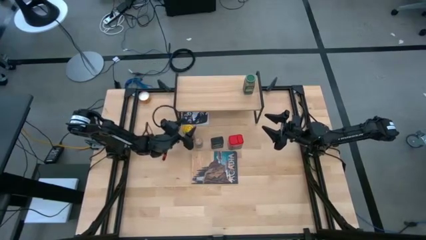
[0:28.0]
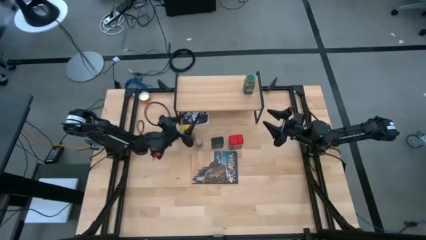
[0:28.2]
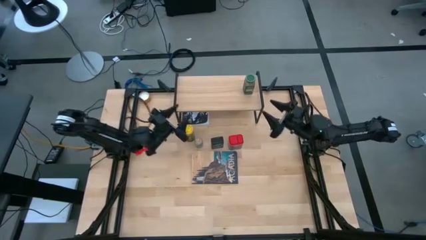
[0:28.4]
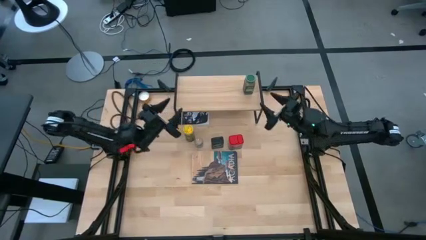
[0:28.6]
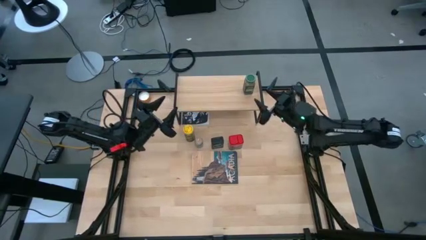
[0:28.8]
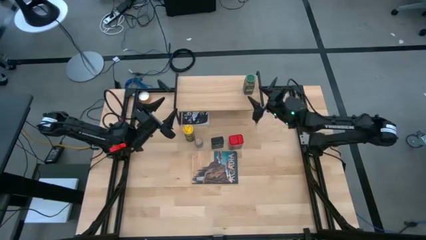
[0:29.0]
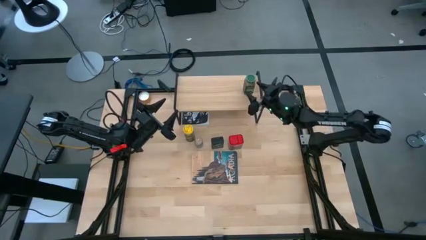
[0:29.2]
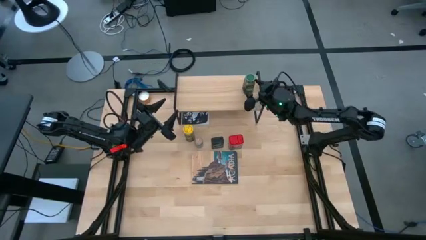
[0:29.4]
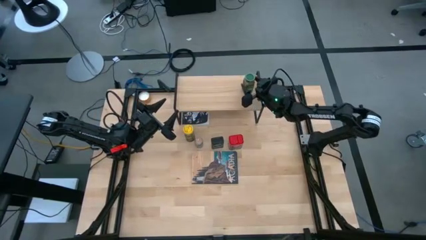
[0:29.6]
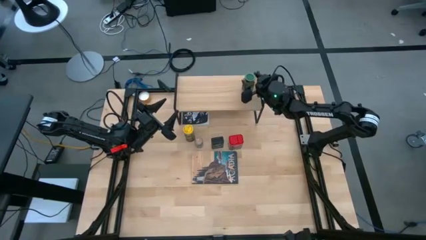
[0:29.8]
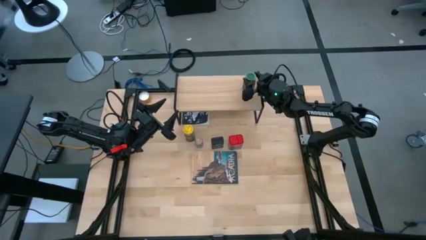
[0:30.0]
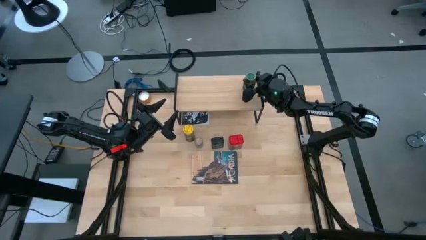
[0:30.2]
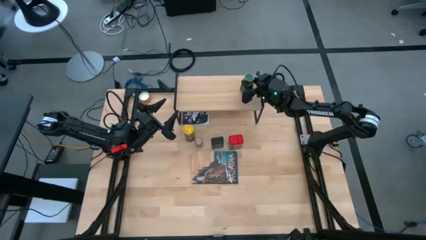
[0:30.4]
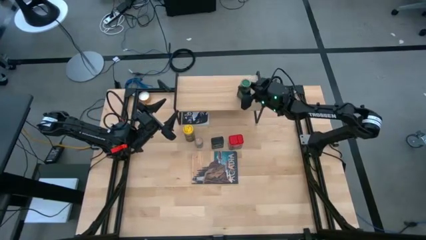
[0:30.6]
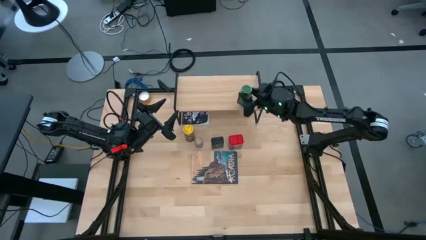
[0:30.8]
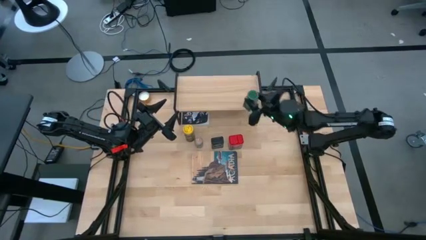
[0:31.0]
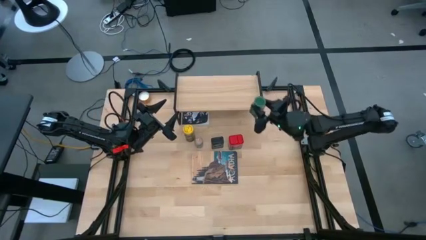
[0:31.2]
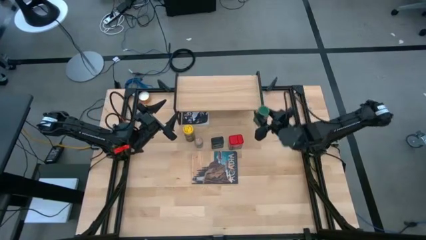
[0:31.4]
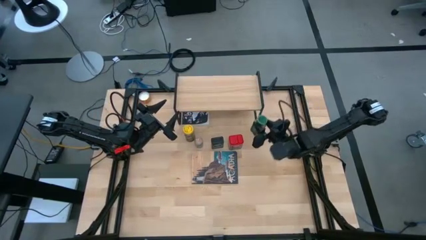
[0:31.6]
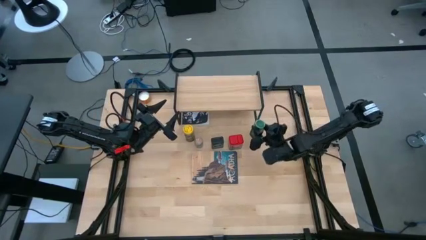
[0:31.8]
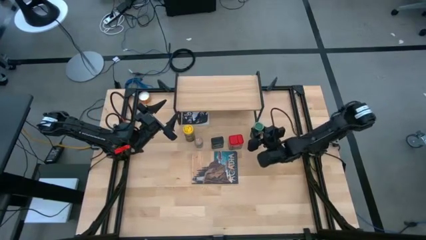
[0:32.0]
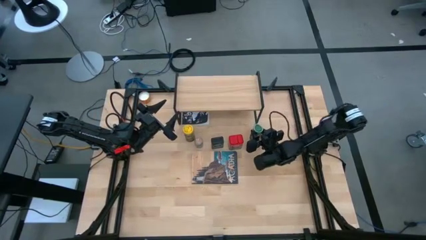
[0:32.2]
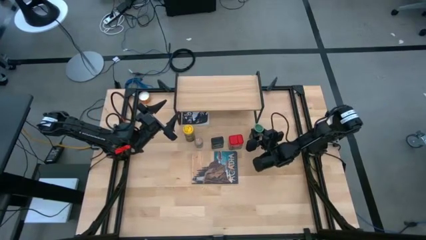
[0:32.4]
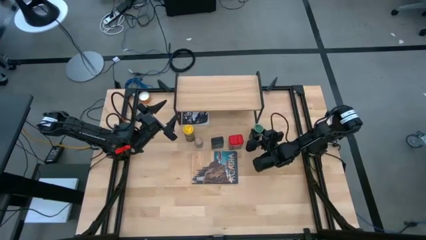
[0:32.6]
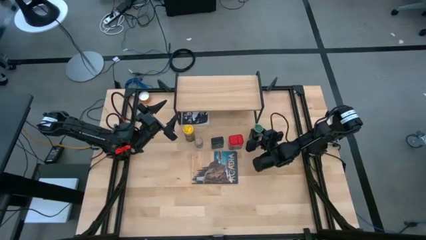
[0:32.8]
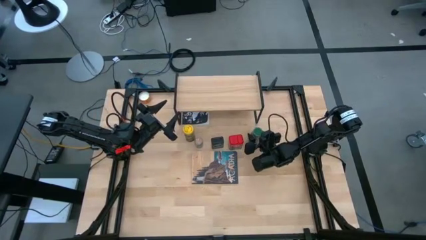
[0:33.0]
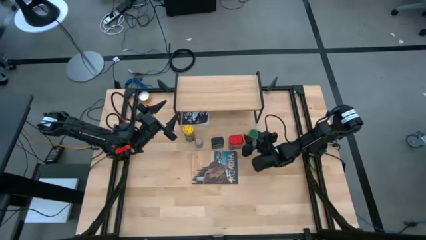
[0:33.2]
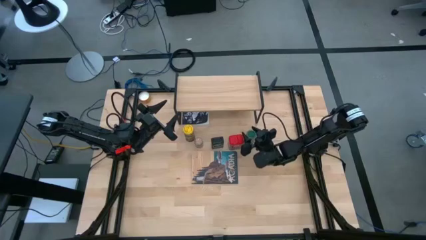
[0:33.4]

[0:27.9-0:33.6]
Task: Shelf spices
Remove the green seasoning bottle from the shelf

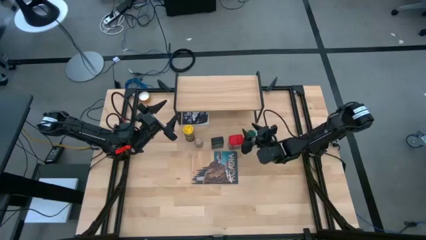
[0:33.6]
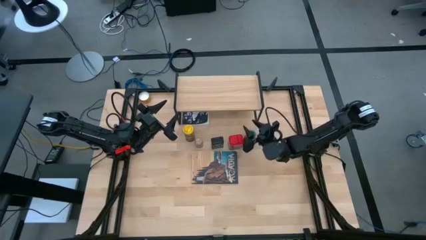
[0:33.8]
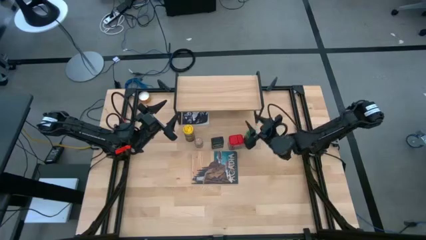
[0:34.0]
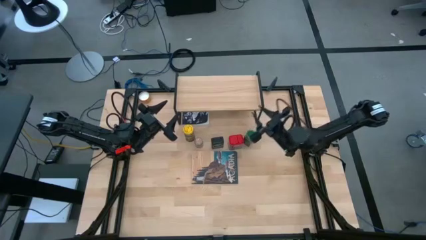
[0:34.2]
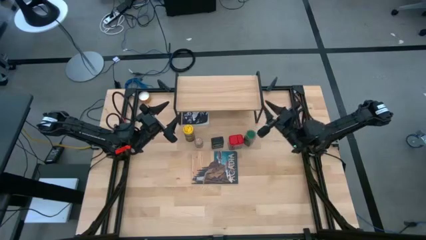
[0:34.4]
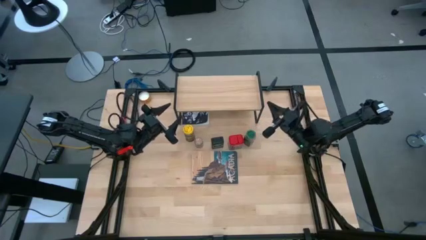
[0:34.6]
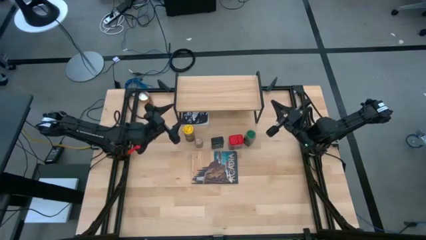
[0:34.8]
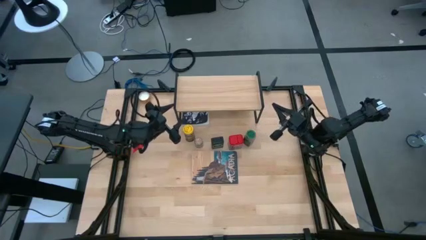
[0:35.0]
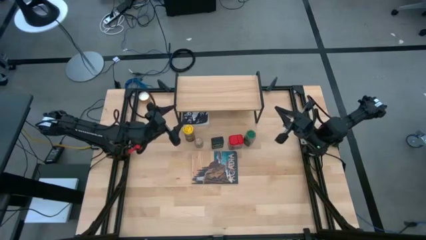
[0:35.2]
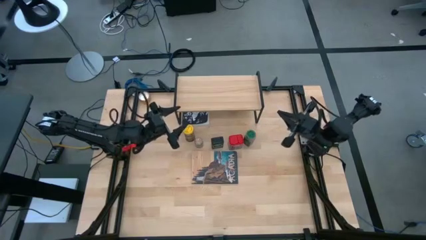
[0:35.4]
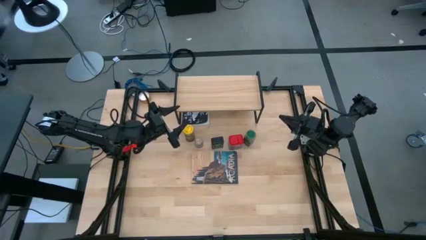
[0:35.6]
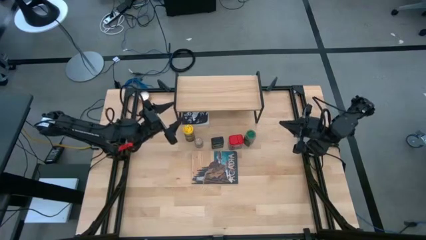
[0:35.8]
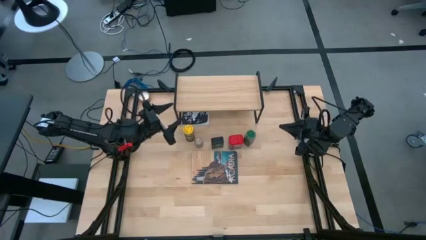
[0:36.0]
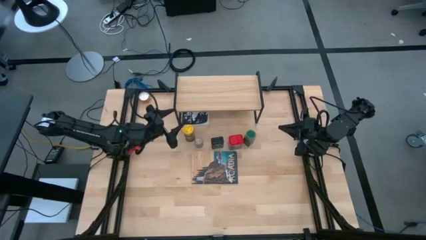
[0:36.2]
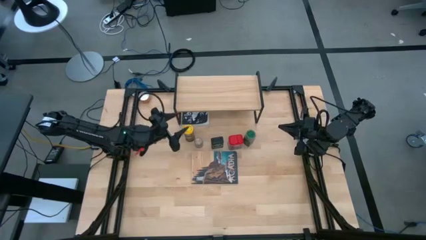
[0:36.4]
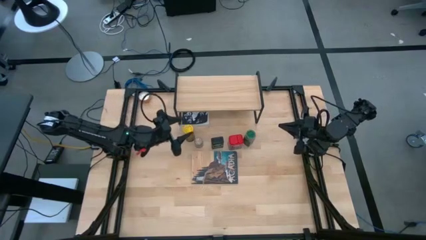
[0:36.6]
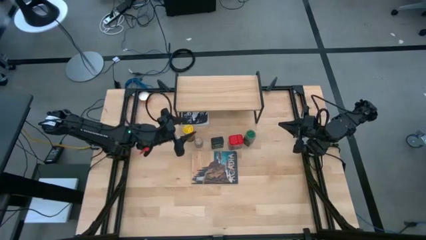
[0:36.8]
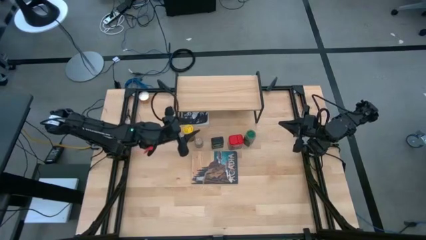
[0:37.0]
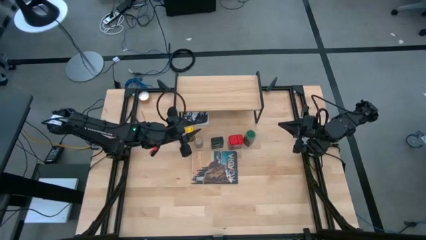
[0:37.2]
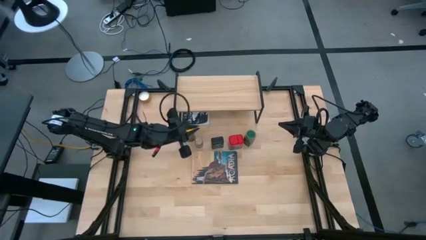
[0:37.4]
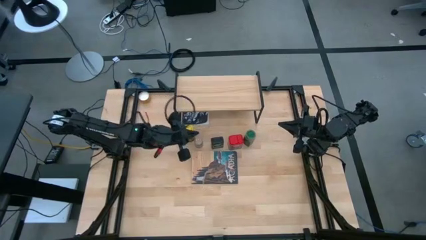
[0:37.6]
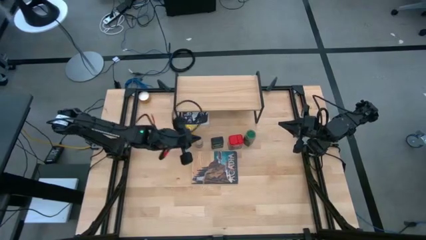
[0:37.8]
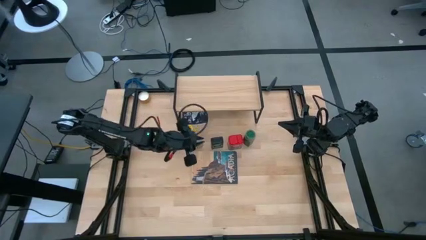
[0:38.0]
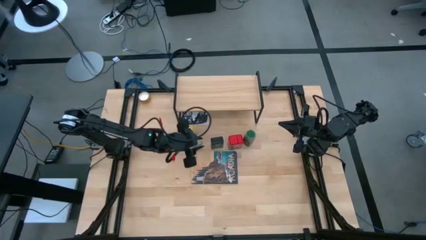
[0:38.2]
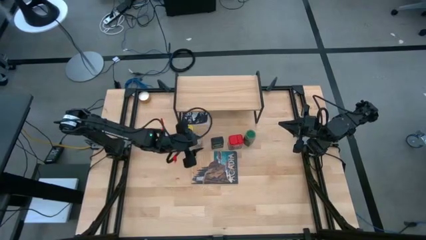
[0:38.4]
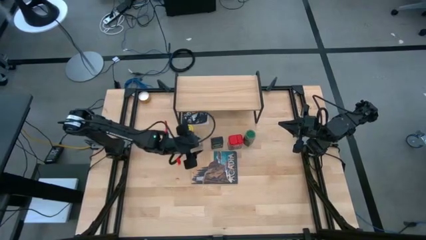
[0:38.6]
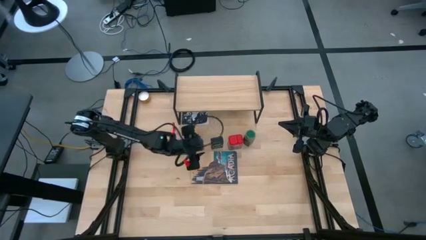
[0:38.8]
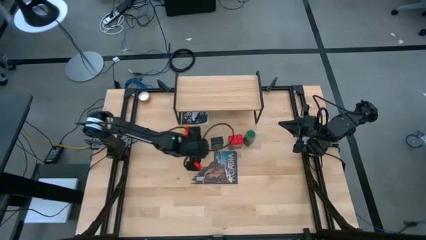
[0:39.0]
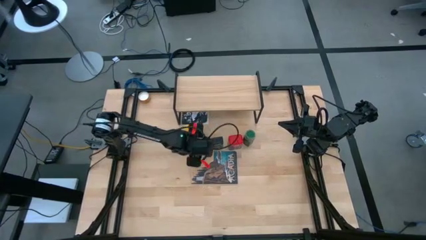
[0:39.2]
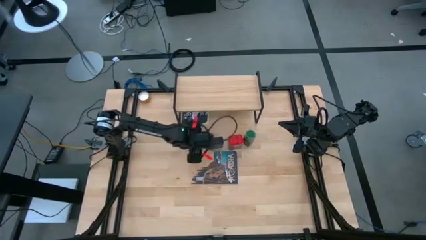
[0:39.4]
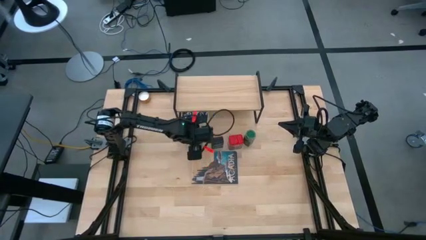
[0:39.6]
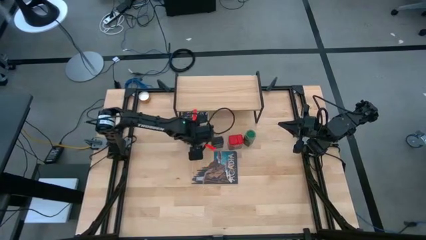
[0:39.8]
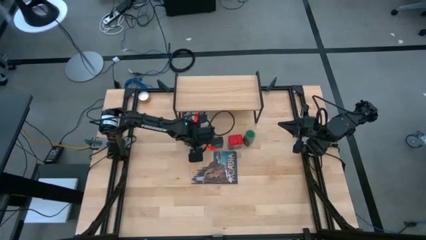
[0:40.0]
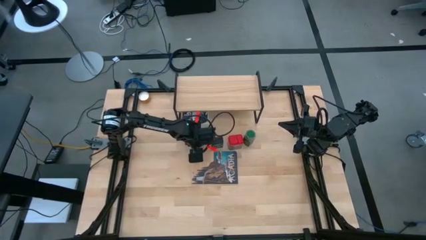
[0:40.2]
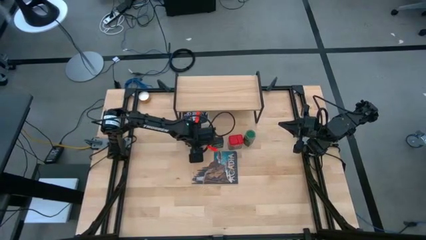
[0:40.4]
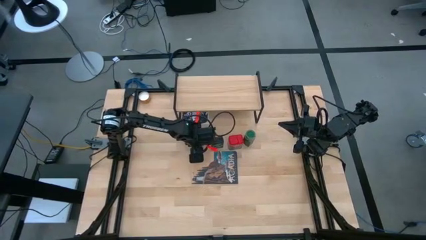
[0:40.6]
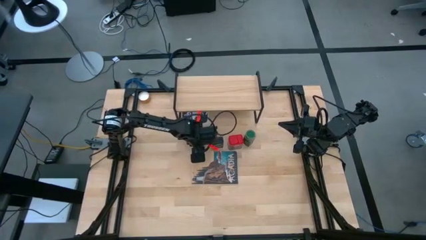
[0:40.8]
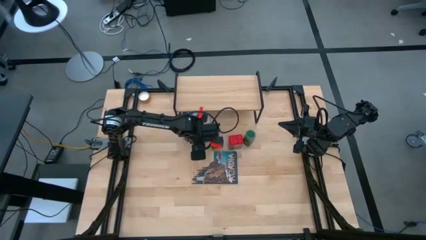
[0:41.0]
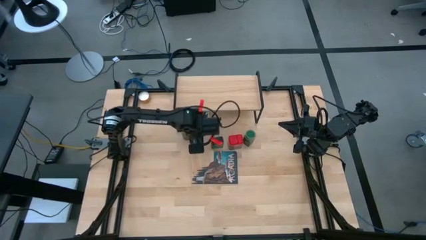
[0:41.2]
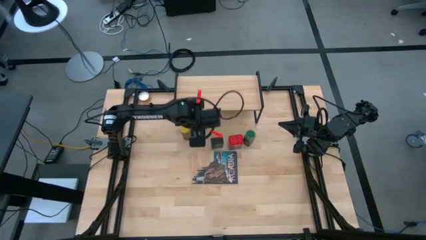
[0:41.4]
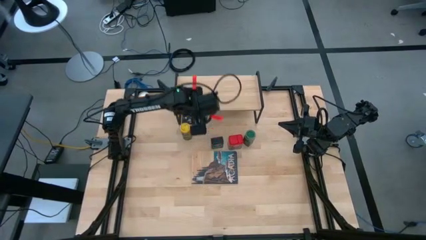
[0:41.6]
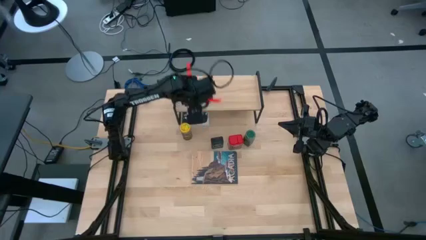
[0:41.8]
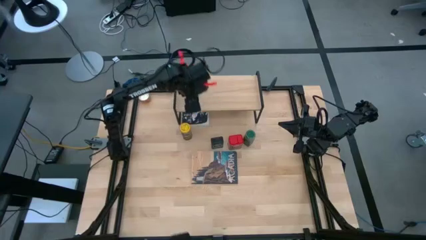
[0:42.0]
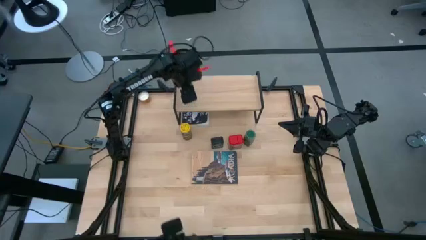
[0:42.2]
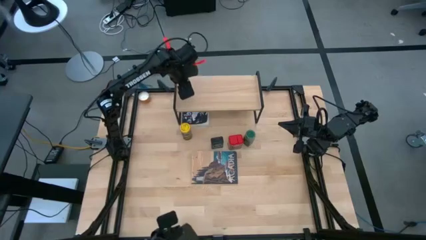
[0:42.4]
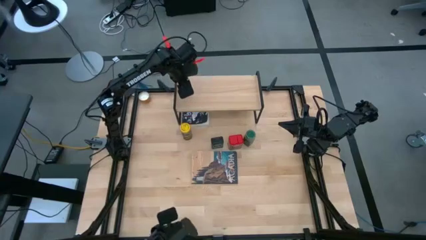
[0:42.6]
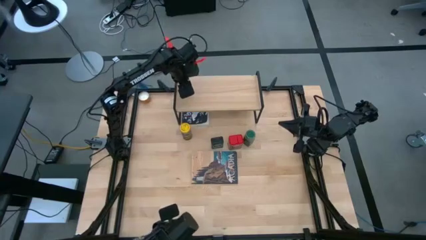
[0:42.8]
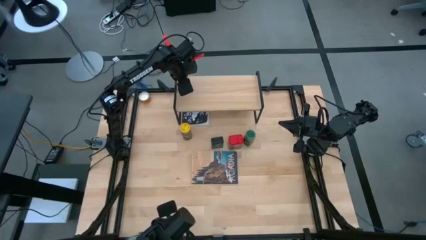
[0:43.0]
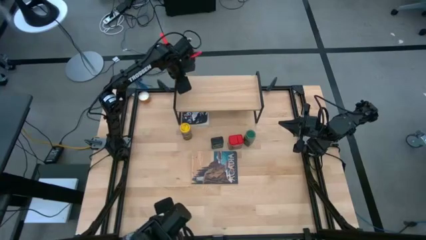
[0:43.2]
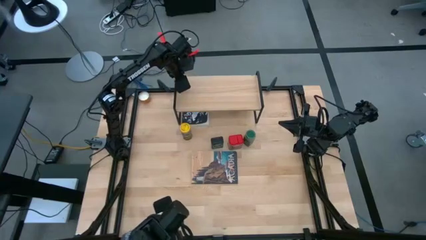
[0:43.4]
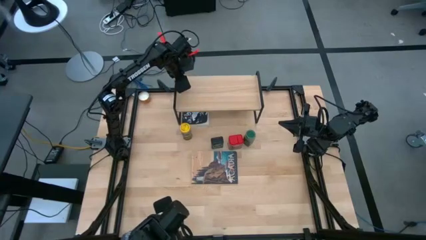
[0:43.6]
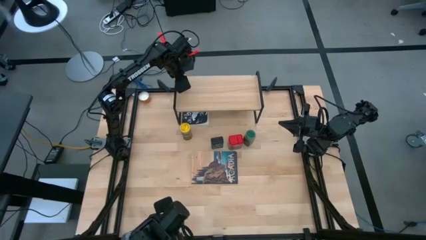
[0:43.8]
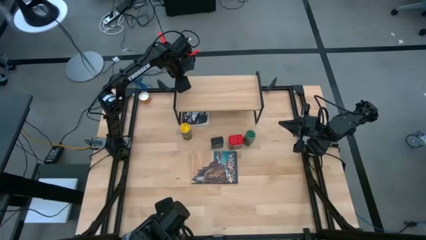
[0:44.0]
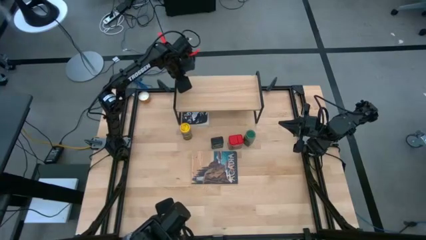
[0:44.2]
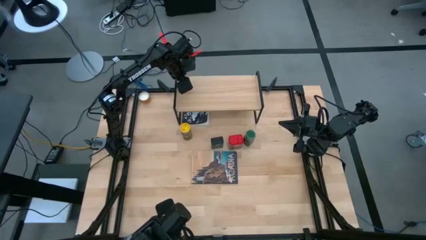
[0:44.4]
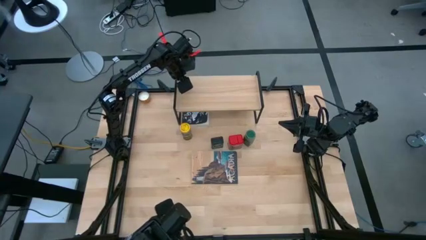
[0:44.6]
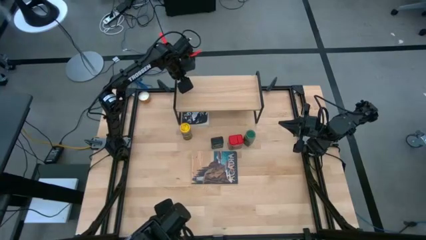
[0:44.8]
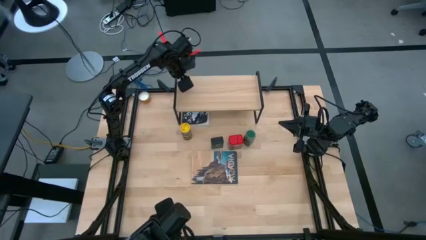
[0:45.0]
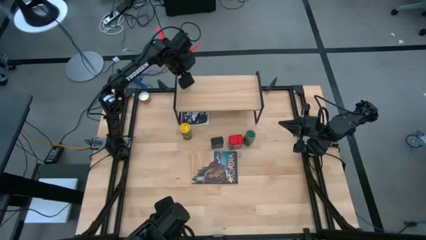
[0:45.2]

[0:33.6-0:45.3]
Put the brown seasoning bottle on the shelf
